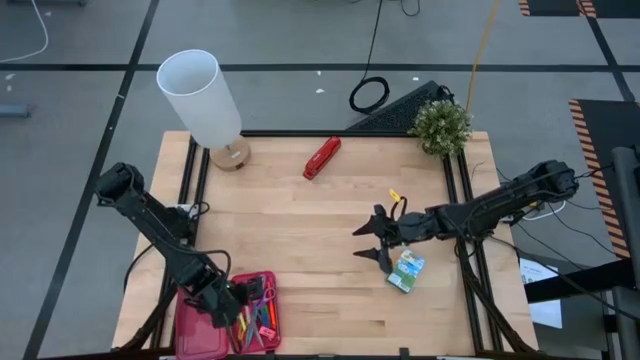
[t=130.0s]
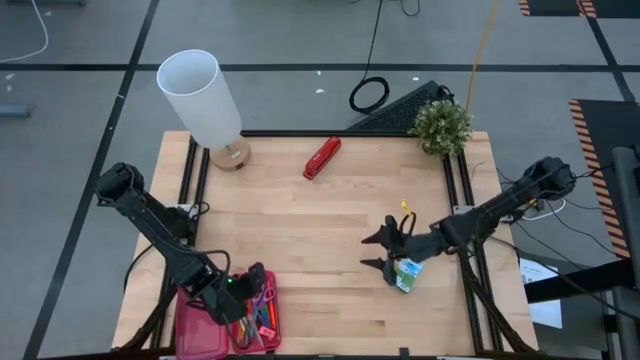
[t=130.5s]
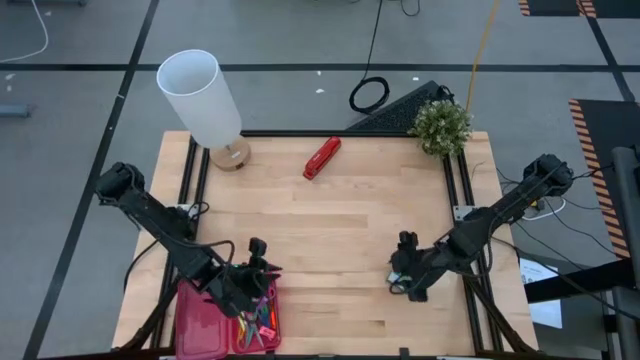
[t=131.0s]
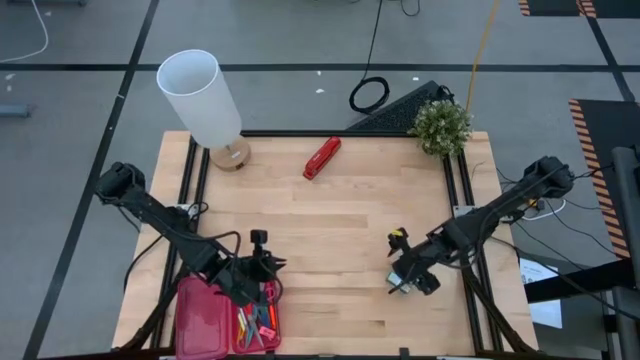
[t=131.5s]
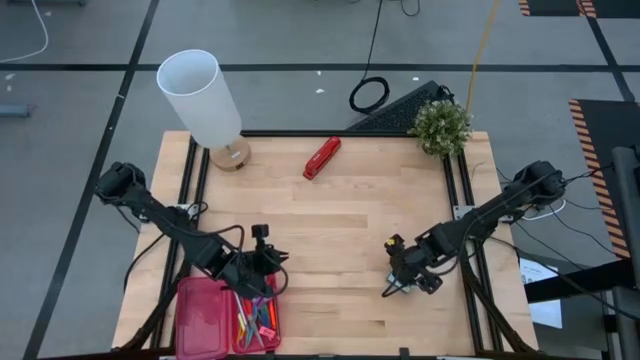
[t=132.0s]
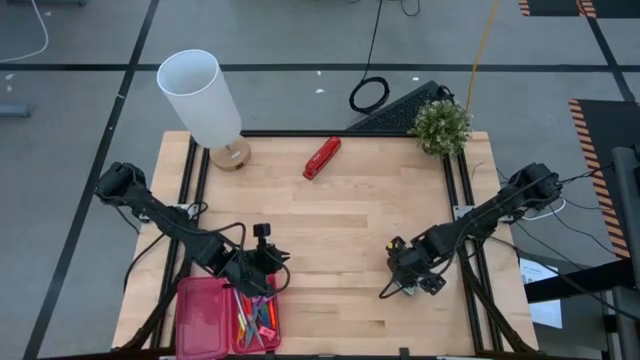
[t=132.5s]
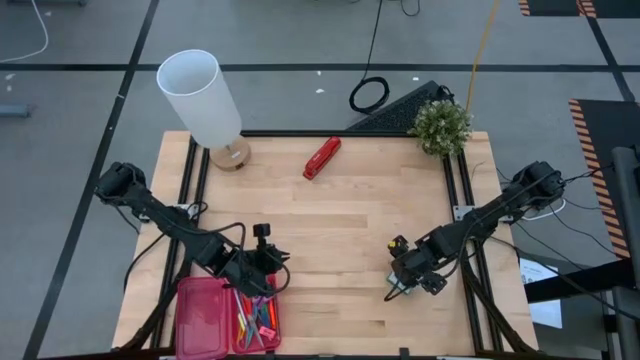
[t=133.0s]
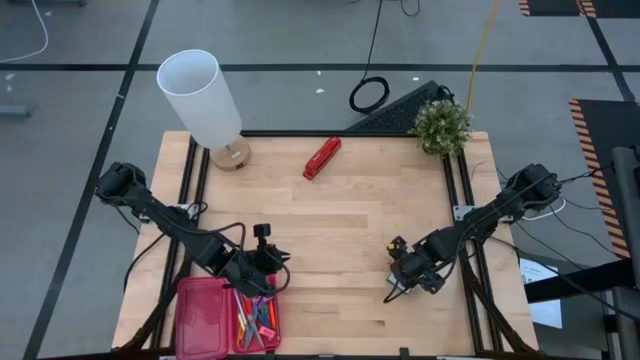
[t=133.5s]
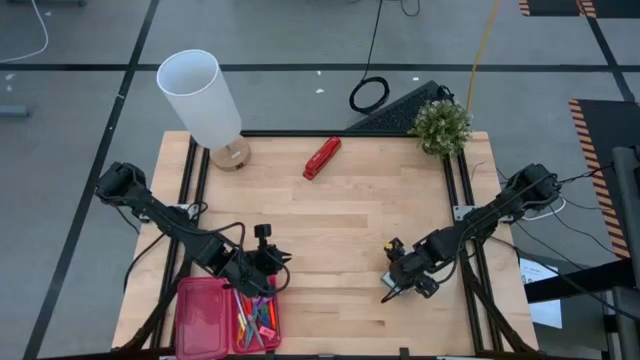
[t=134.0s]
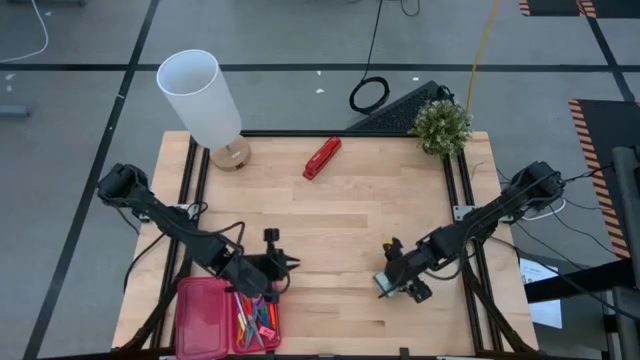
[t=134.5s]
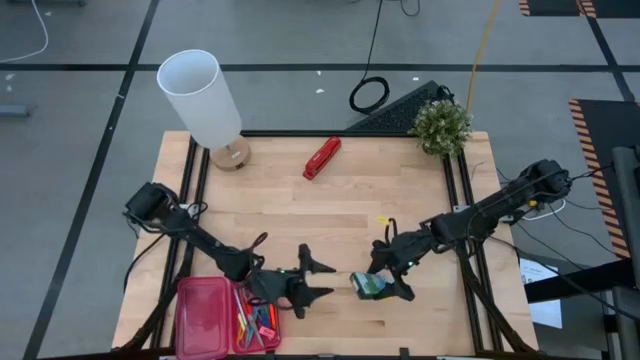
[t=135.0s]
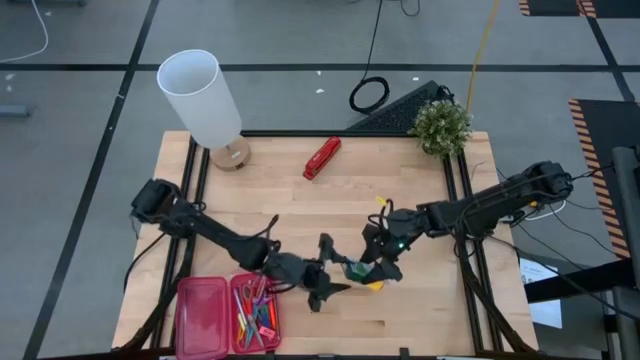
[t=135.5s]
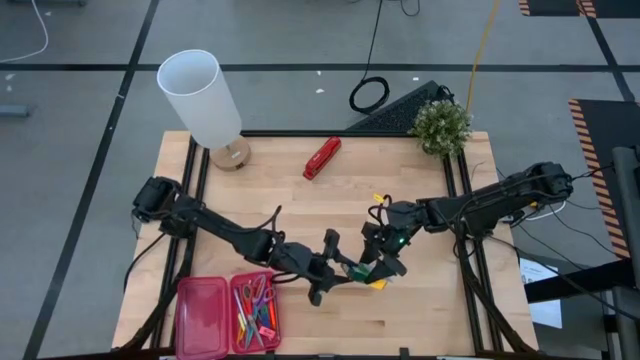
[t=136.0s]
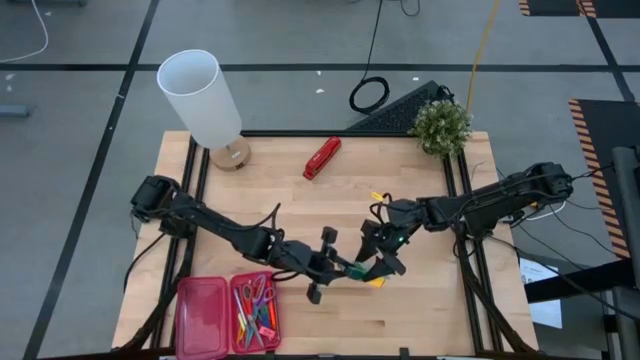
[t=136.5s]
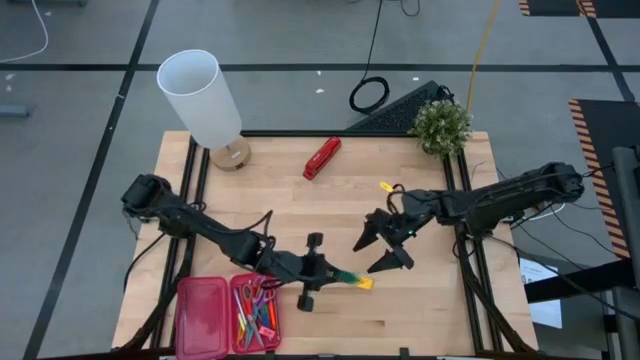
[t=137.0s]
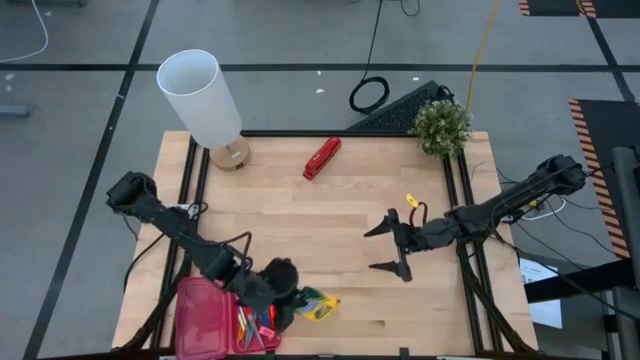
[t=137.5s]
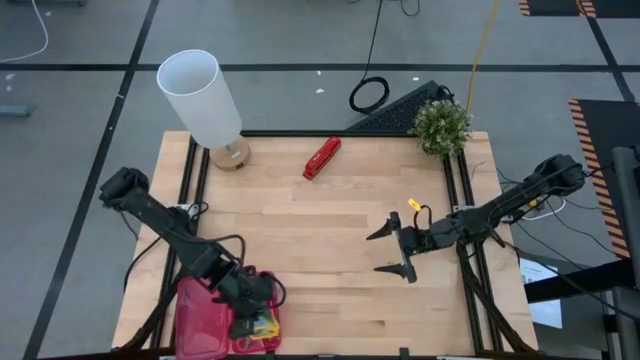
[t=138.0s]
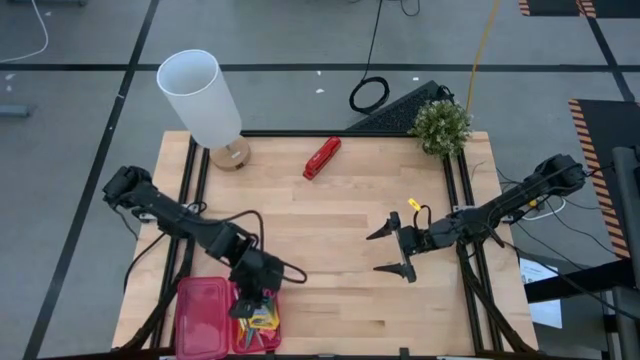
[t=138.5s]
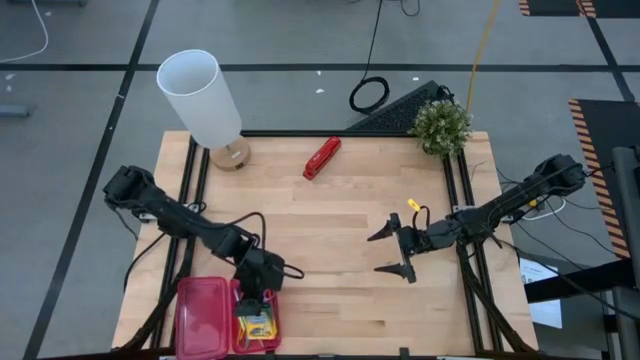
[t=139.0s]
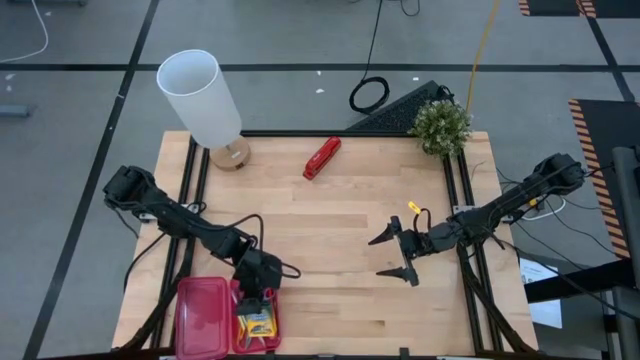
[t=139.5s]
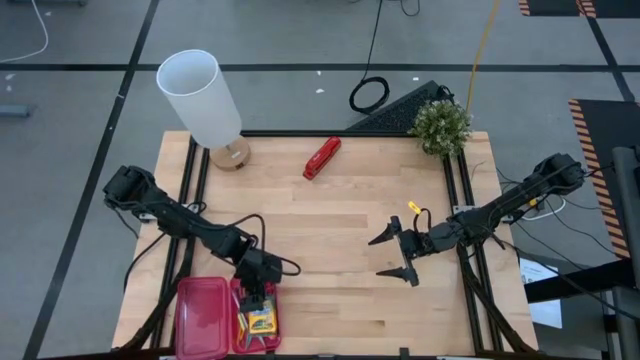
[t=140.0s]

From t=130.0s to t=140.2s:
Task: Pack school essentials
Put the yellow crayon box into the red supply box

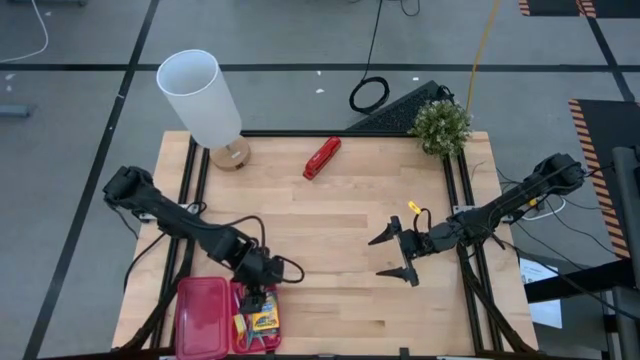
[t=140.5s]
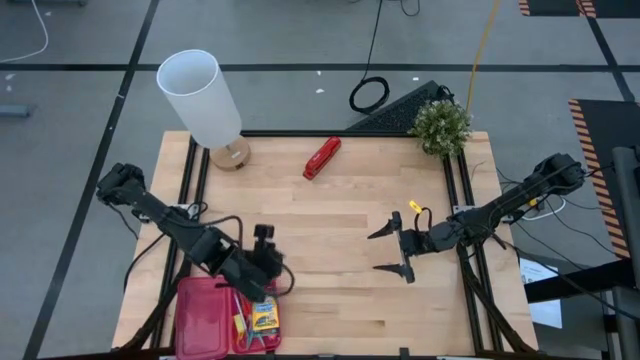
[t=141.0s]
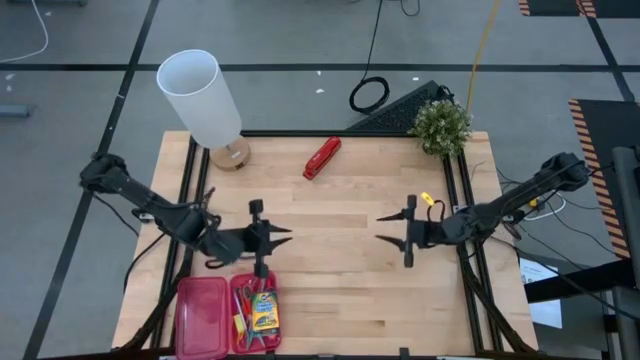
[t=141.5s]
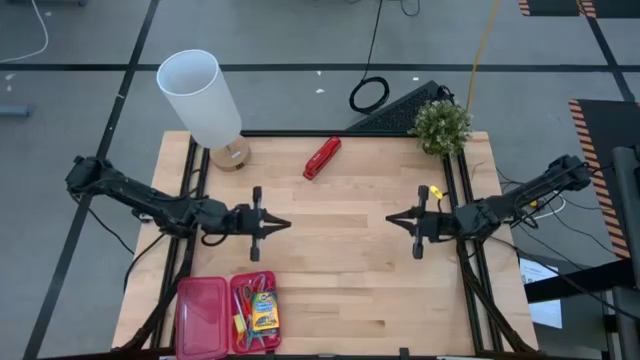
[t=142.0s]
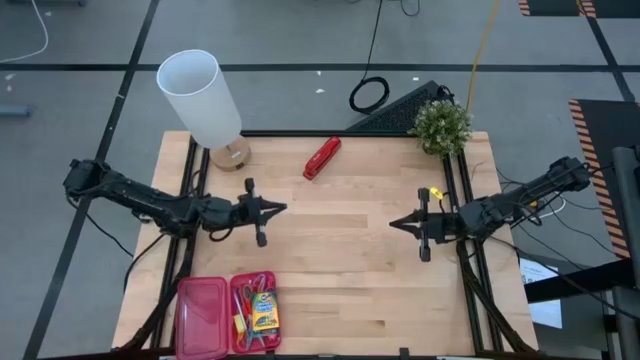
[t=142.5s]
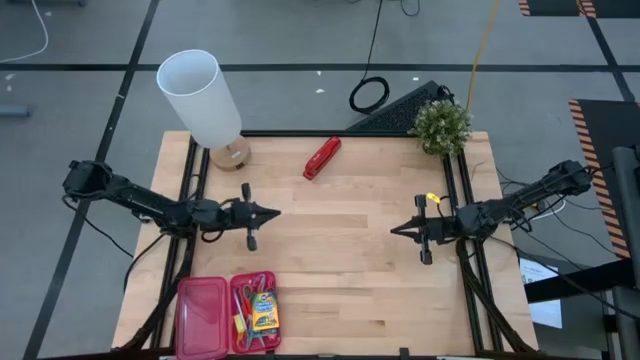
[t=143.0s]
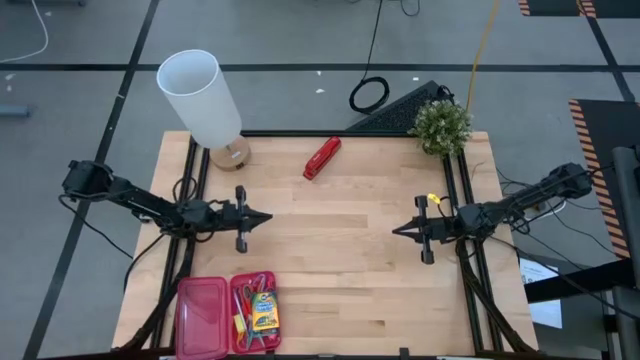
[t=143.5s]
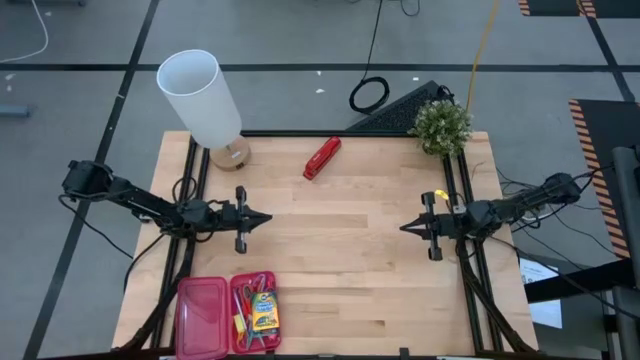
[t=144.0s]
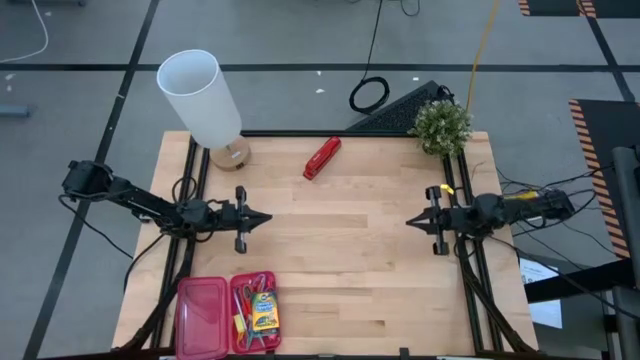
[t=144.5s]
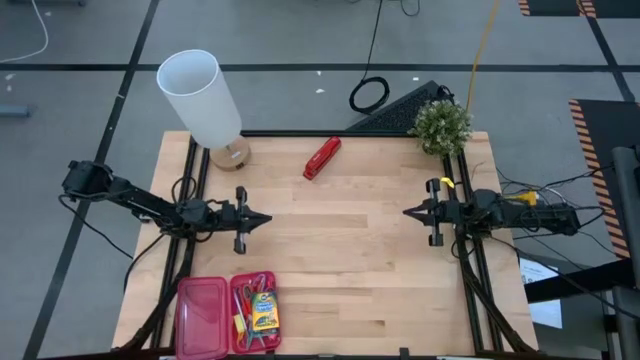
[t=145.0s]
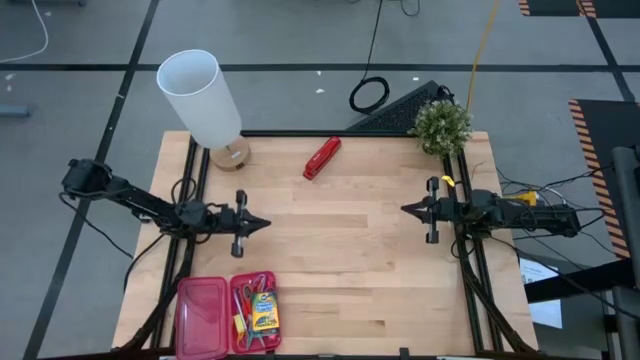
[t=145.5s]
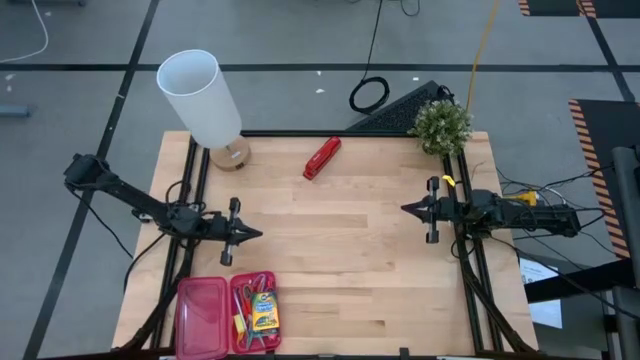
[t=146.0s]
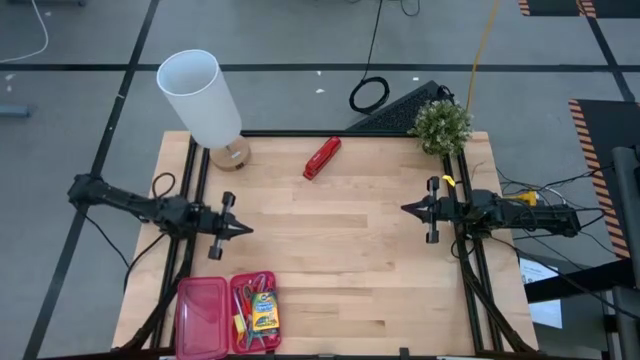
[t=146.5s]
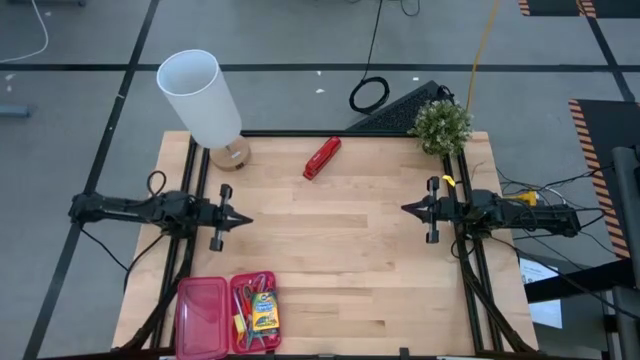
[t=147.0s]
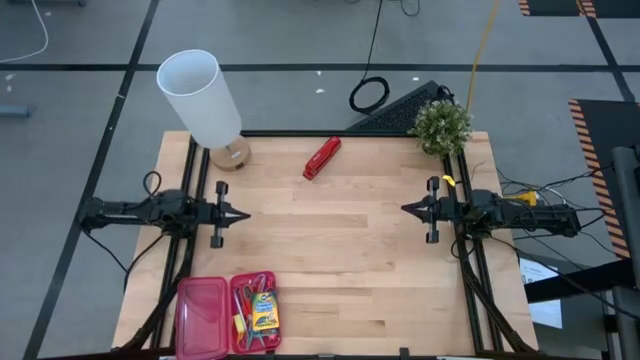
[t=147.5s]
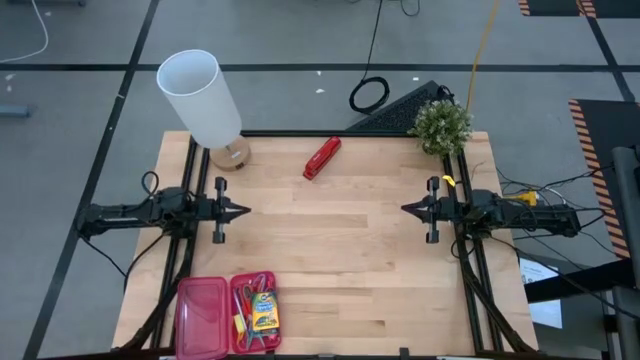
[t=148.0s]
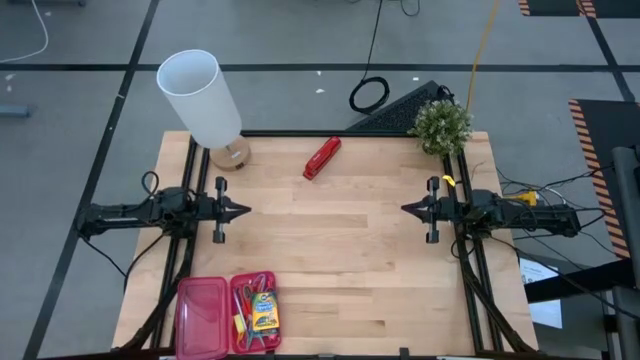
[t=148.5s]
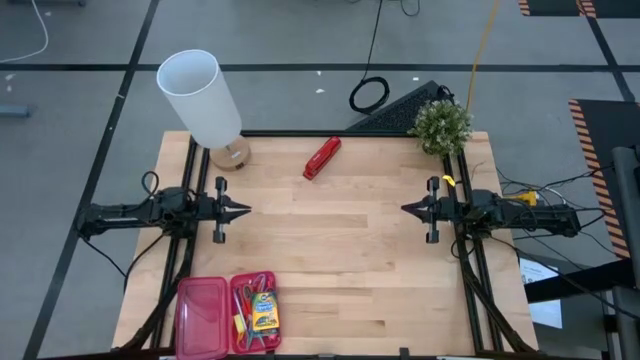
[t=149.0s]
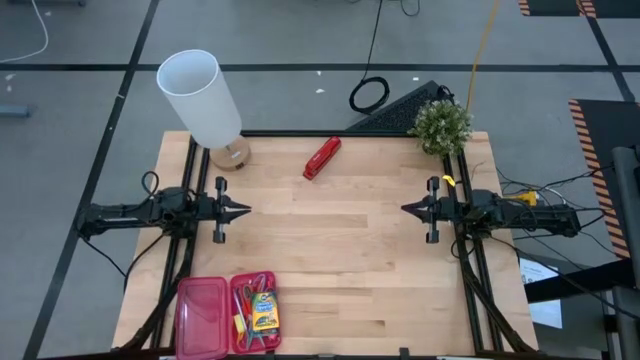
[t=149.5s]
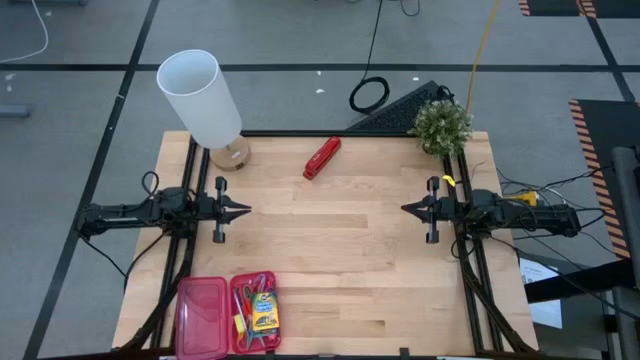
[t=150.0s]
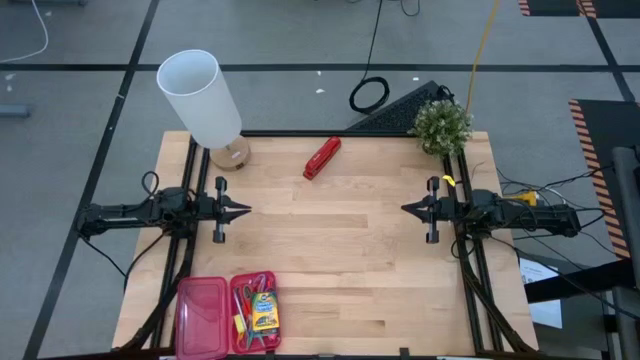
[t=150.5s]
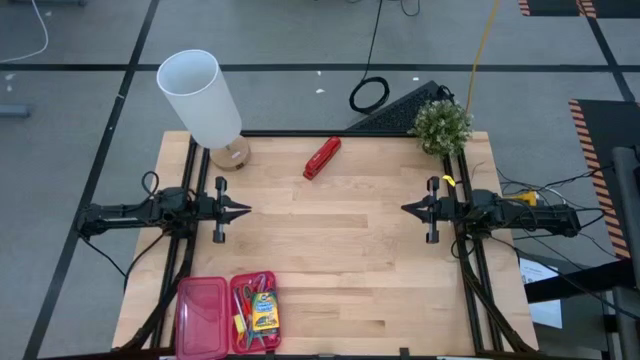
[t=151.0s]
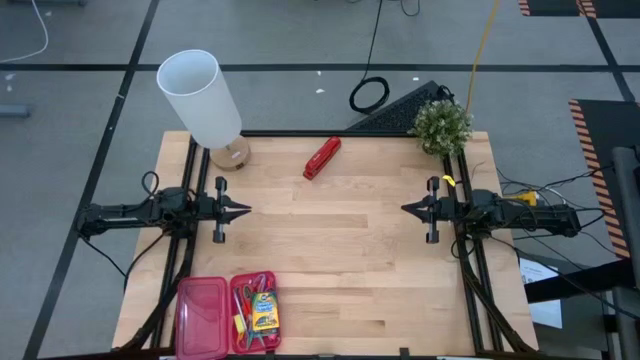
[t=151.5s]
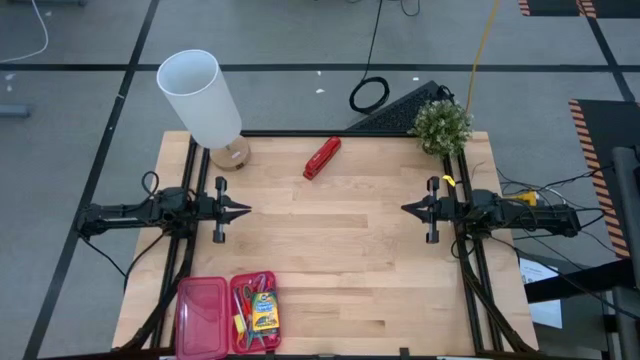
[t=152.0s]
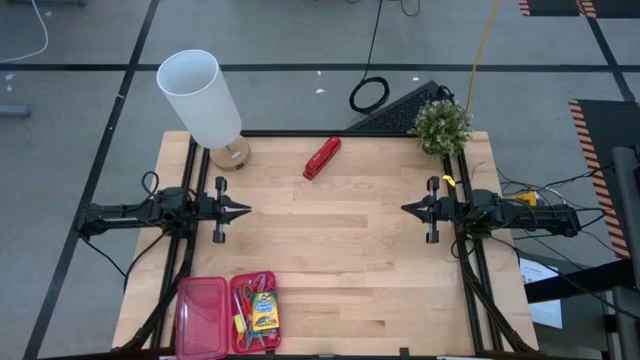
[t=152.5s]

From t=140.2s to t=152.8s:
Return to Home Position
